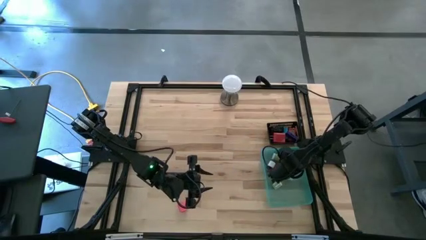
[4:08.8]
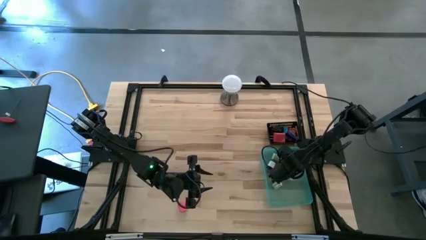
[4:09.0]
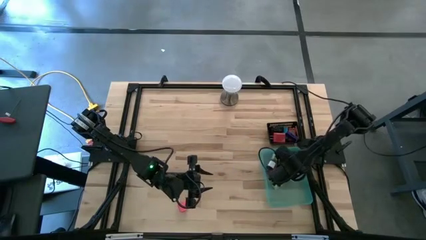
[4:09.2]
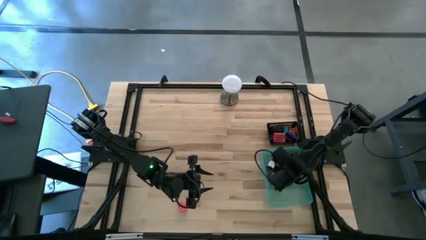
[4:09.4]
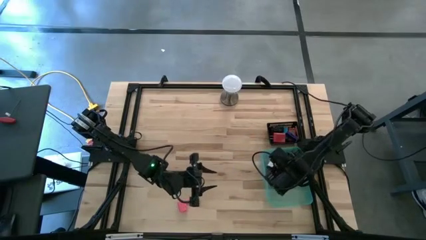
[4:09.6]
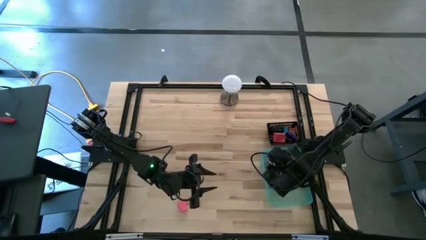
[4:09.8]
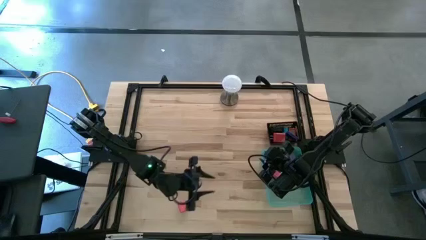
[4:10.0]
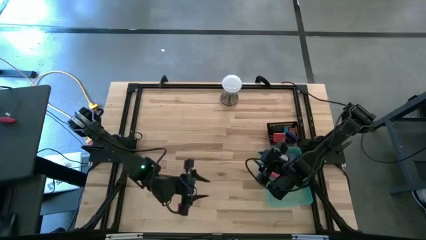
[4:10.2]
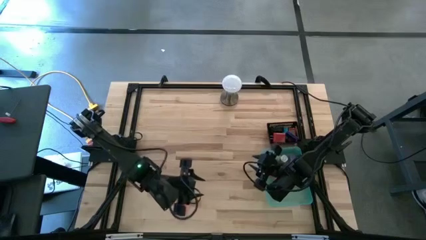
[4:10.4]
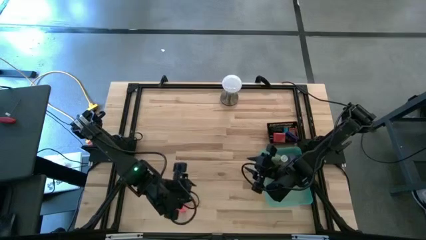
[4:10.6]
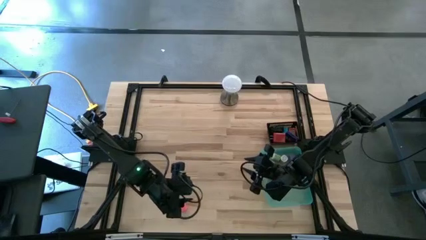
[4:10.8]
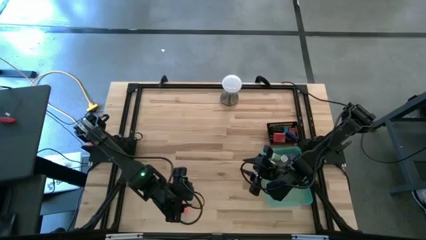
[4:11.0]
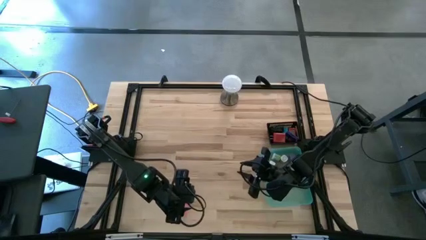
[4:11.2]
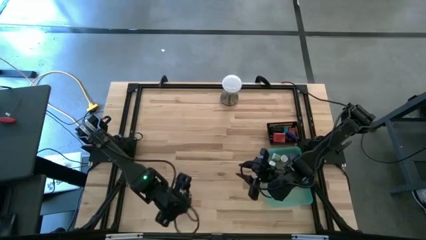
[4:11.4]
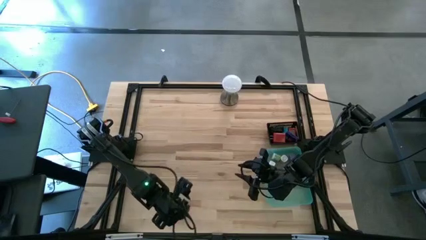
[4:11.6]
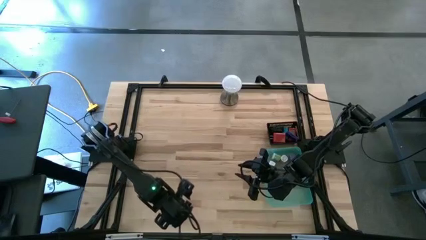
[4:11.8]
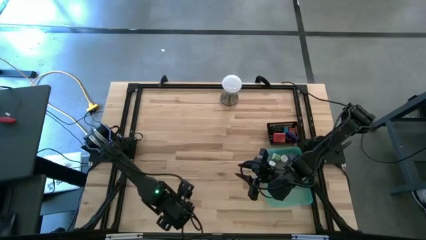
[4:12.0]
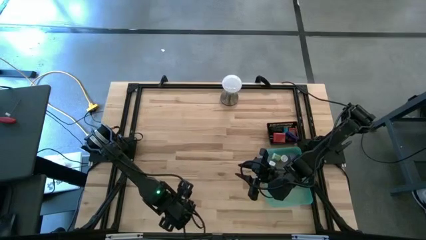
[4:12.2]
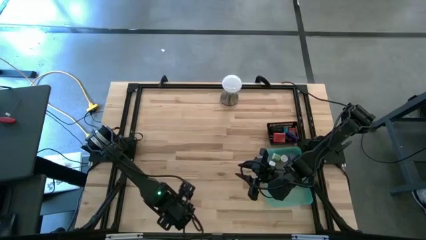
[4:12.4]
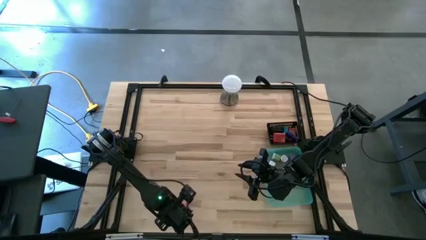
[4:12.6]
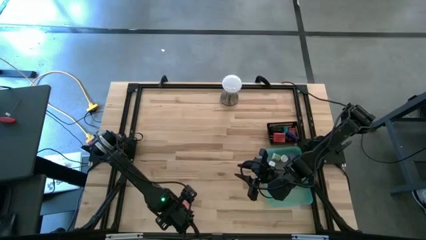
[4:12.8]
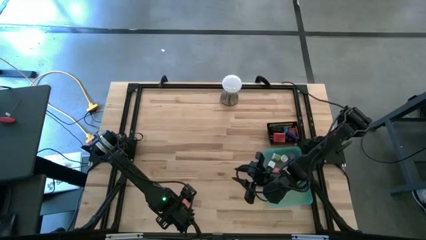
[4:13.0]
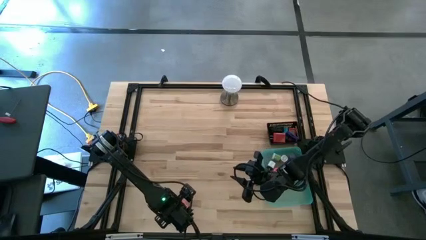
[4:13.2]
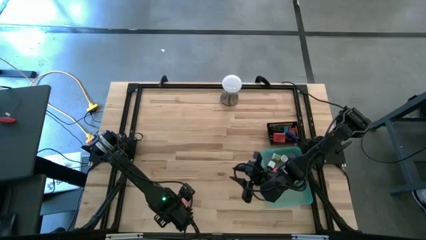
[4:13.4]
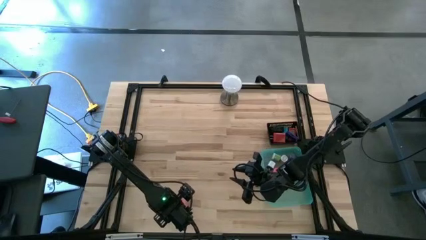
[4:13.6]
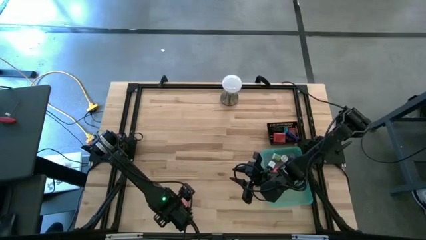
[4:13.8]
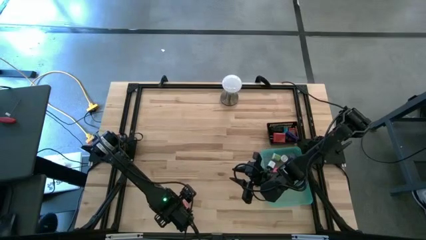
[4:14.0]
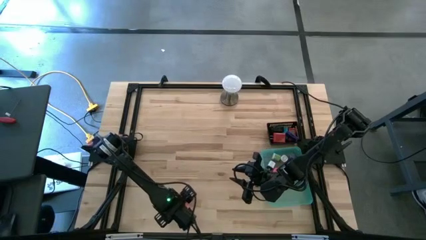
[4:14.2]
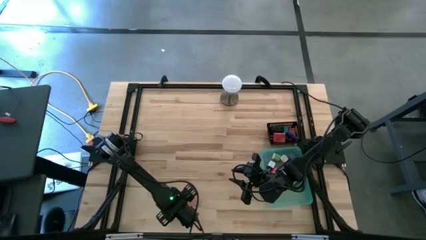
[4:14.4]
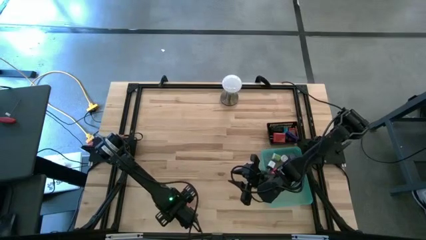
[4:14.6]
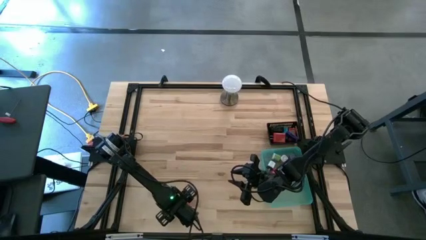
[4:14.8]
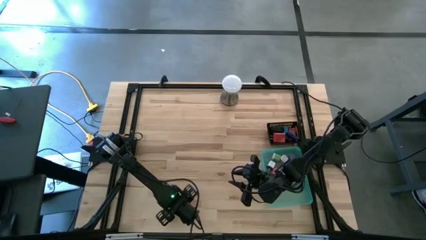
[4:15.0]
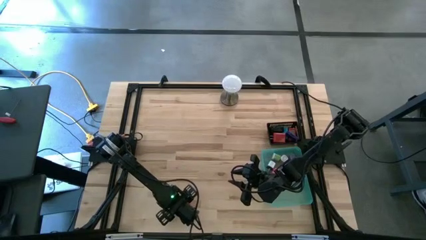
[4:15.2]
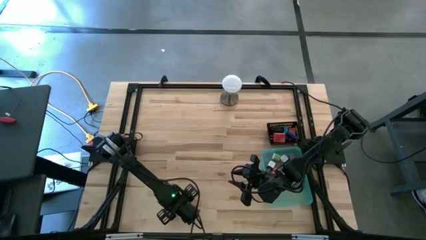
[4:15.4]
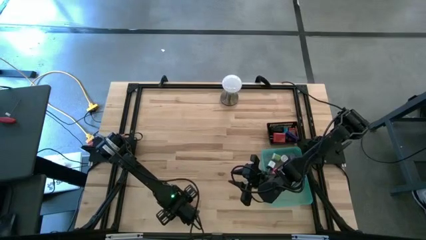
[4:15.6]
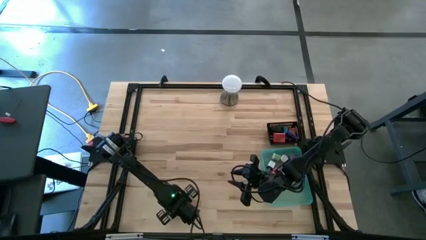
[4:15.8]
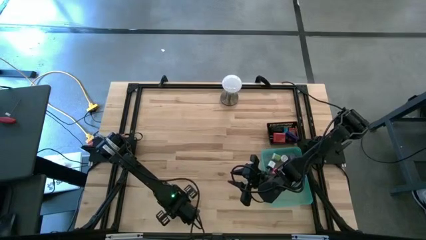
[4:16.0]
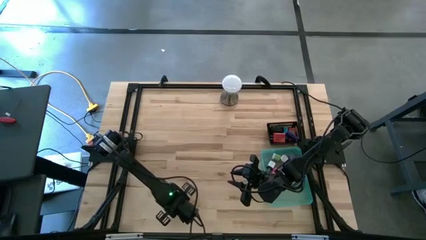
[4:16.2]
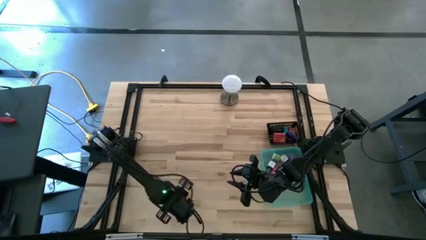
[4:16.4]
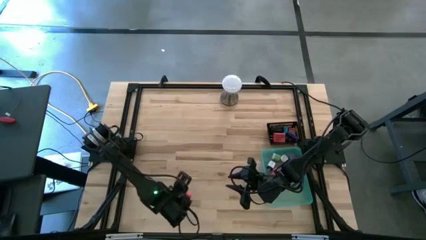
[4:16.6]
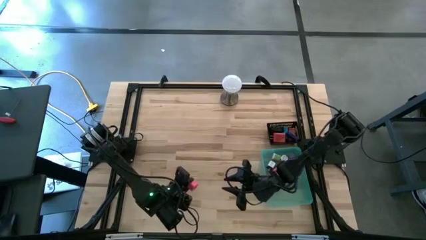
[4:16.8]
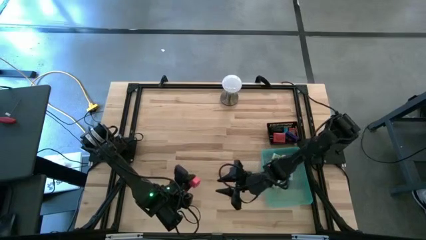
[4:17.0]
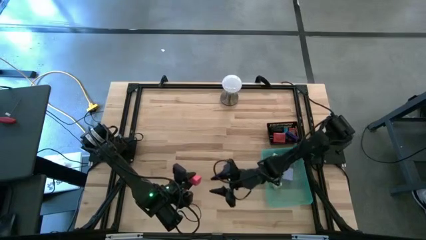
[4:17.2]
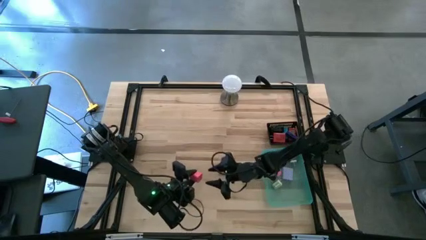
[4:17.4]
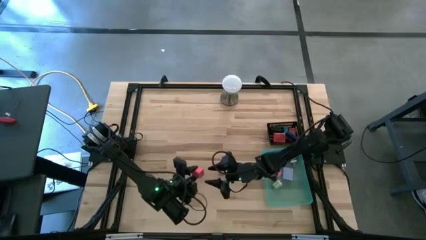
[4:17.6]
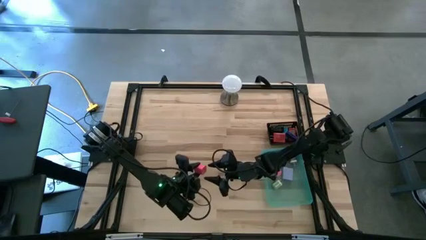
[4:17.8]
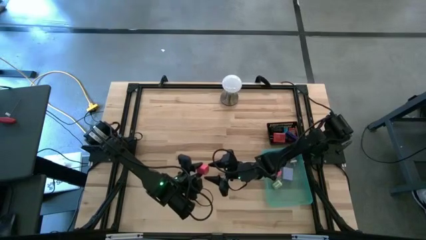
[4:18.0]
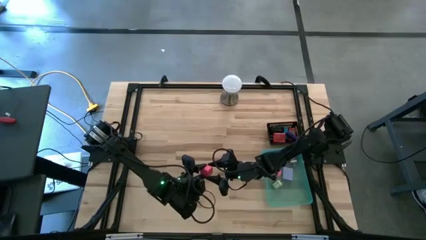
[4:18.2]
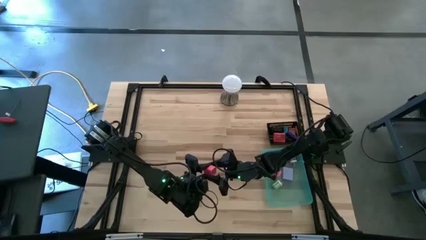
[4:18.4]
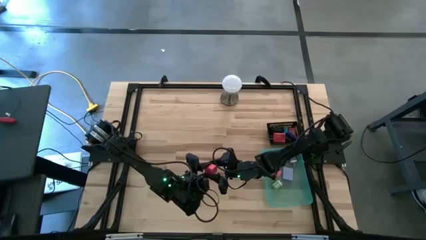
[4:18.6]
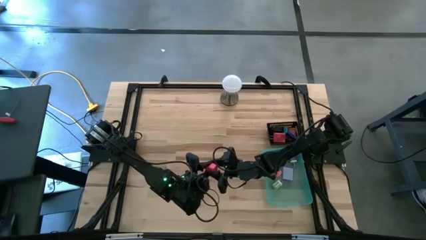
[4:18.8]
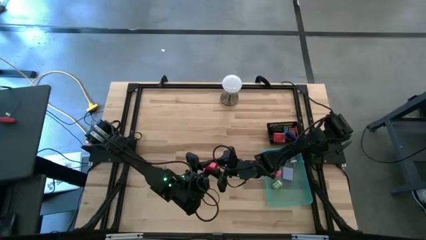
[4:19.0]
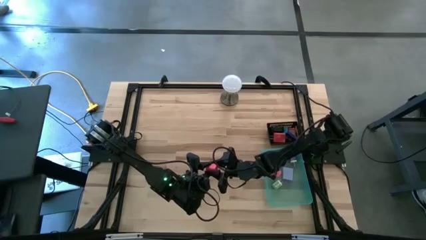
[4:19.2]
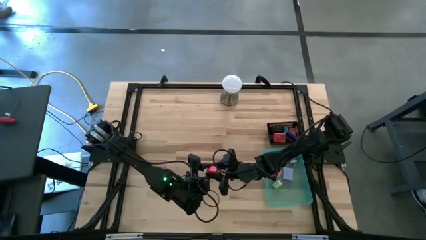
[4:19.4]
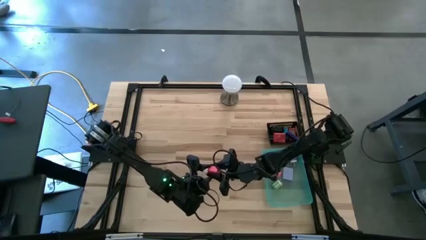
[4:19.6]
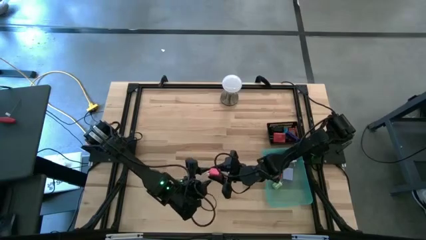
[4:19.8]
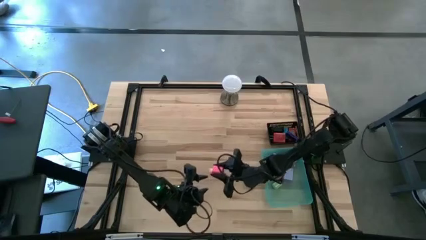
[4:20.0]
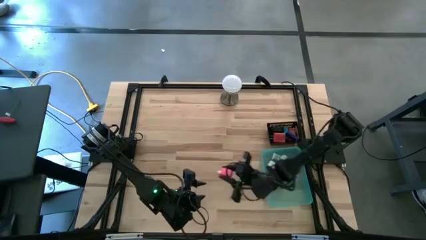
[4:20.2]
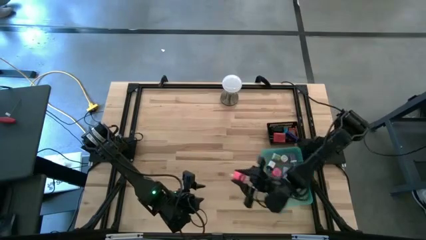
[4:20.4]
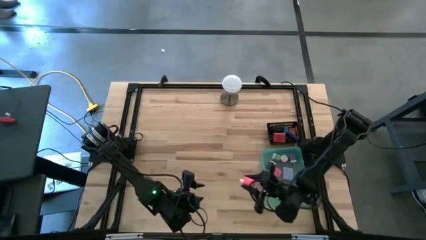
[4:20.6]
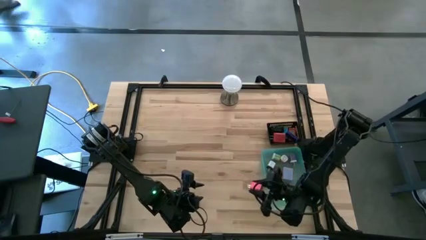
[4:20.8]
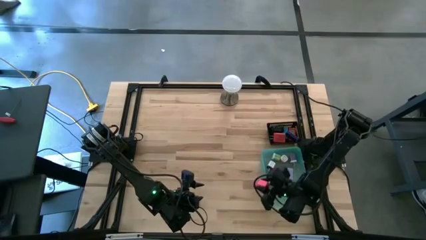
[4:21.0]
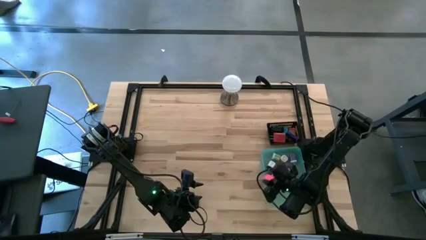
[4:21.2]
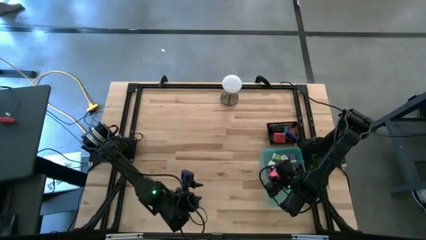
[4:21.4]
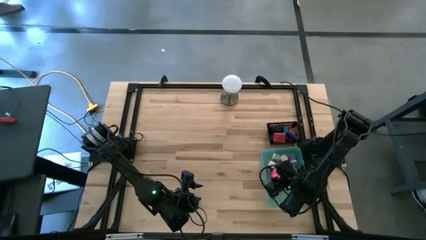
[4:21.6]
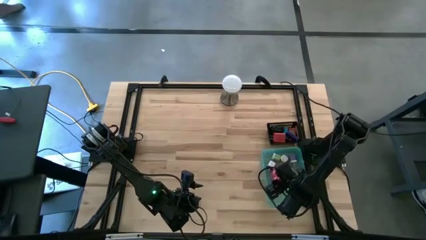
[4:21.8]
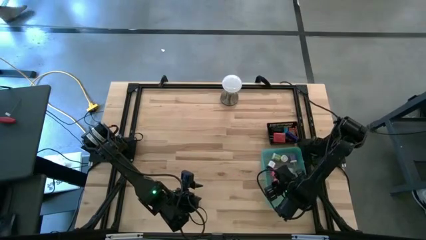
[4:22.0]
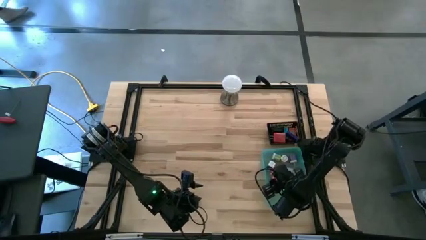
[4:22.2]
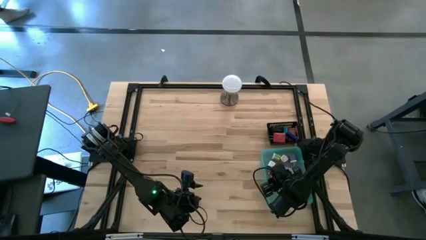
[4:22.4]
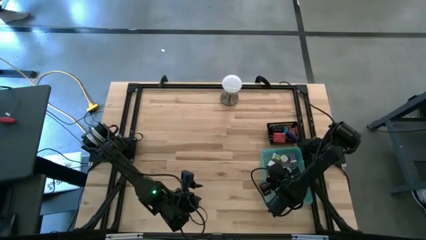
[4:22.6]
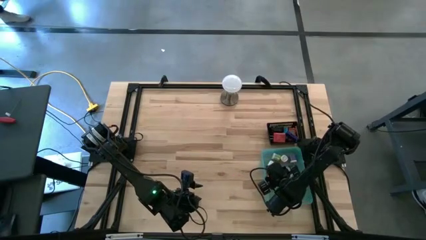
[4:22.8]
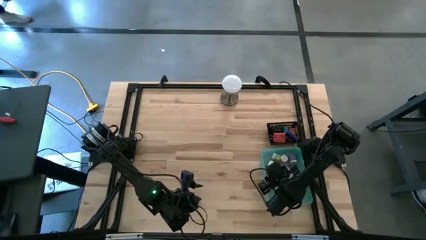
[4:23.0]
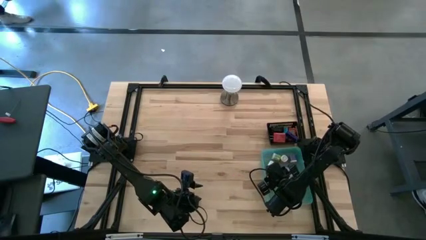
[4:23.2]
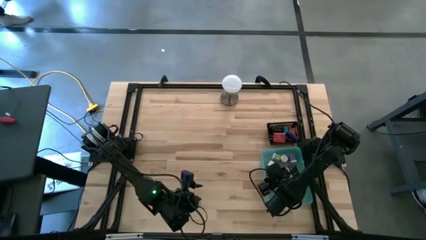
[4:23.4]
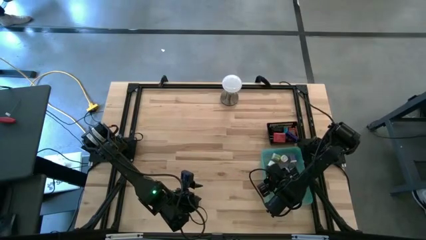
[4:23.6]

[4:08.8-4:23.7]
Task: Pick & Place Office items
Put the pink charger adapter into the green bin
